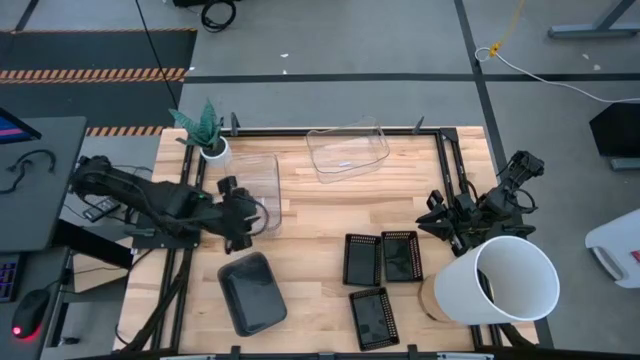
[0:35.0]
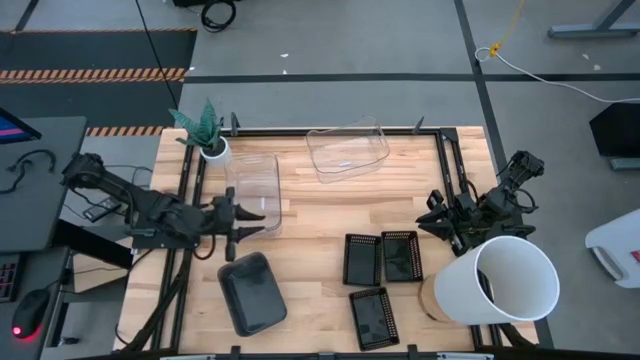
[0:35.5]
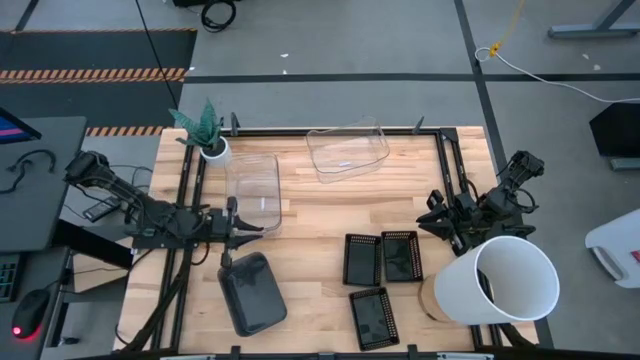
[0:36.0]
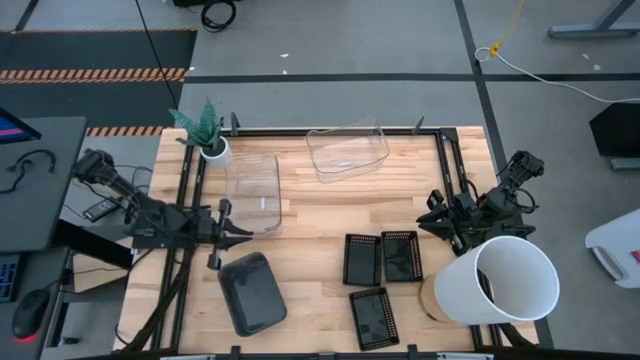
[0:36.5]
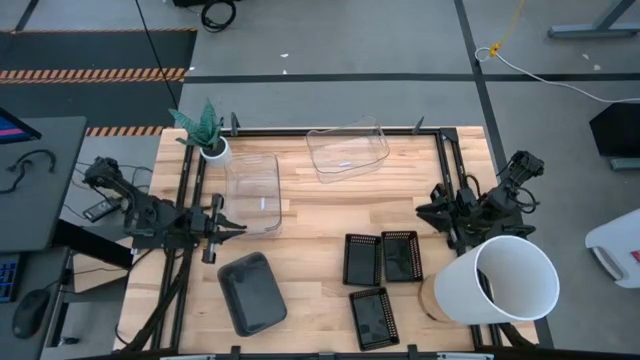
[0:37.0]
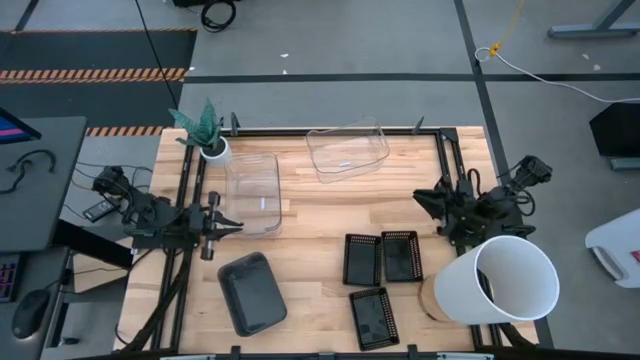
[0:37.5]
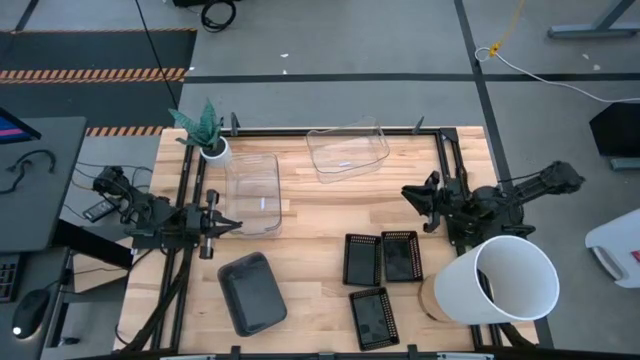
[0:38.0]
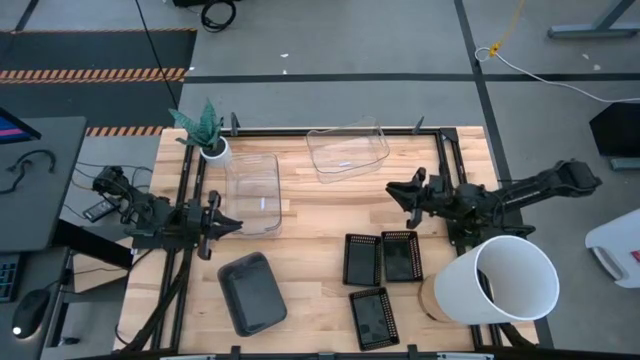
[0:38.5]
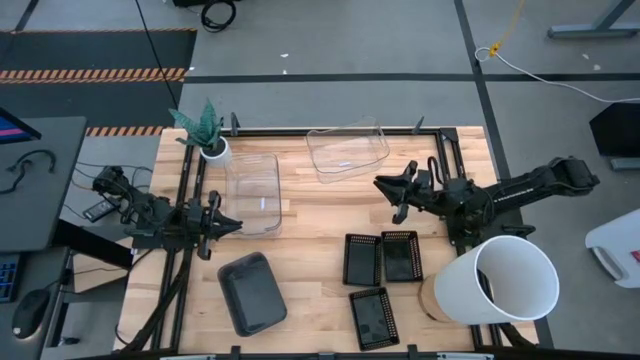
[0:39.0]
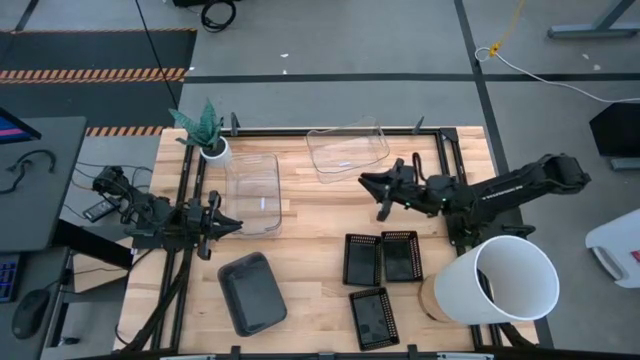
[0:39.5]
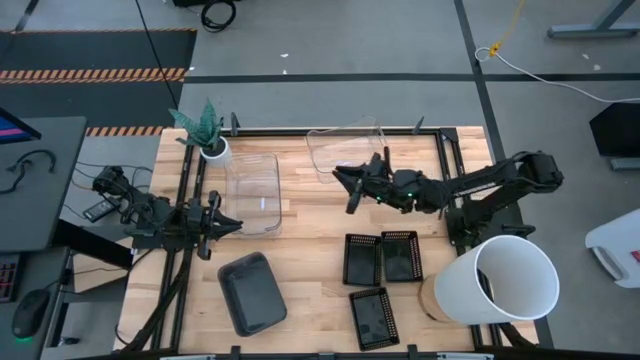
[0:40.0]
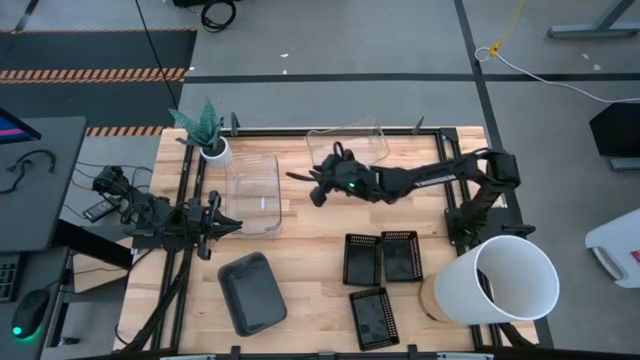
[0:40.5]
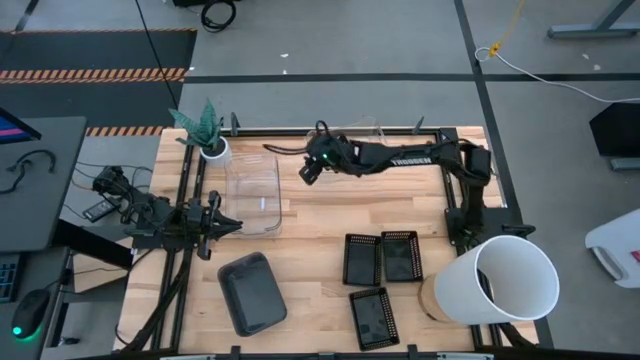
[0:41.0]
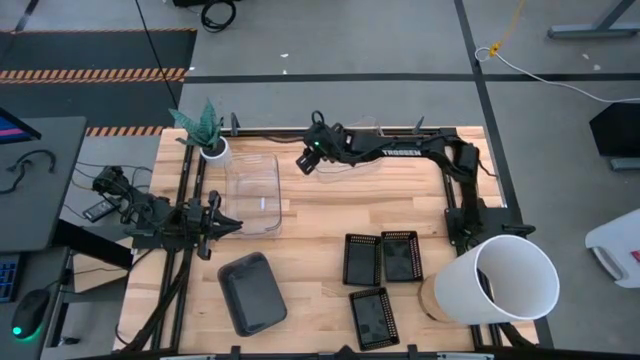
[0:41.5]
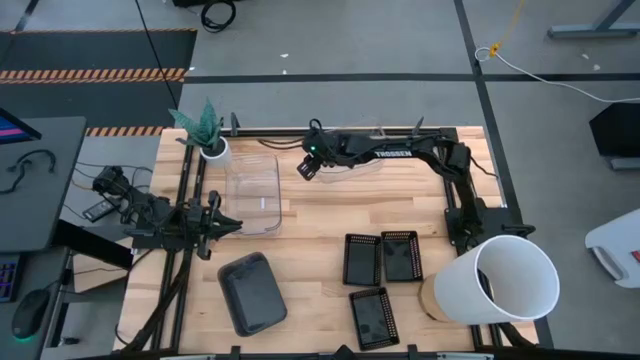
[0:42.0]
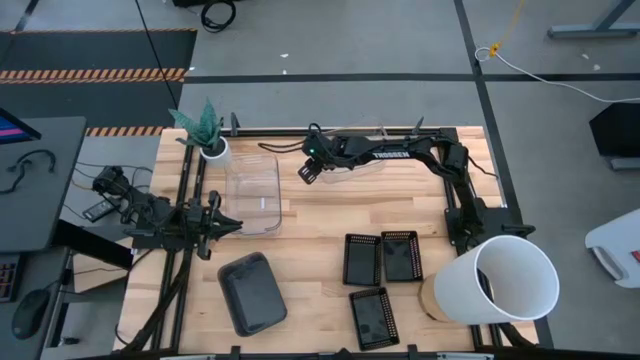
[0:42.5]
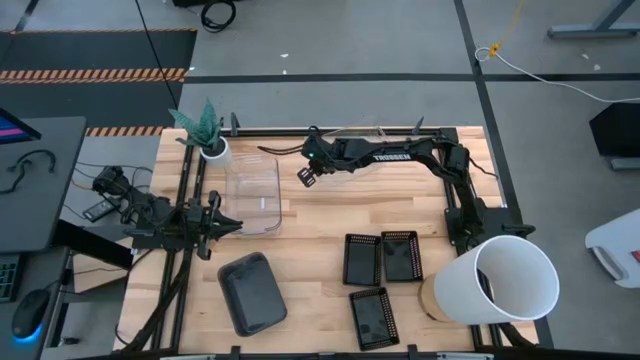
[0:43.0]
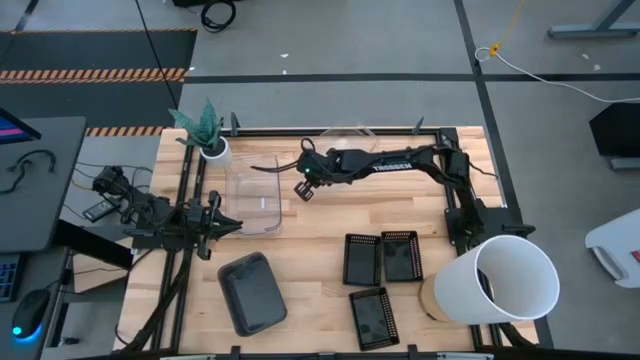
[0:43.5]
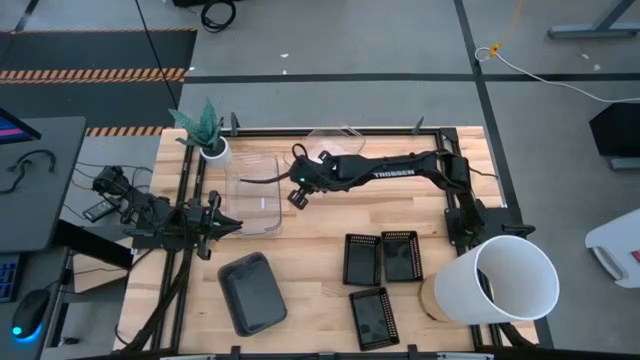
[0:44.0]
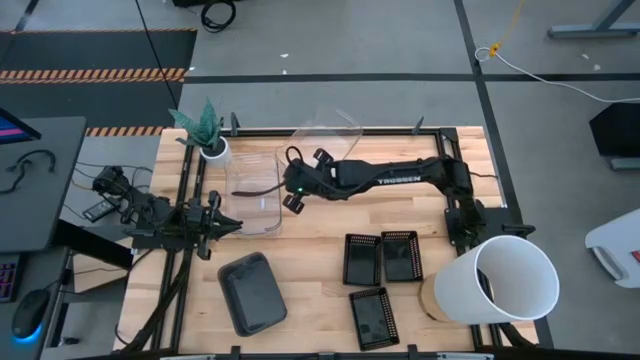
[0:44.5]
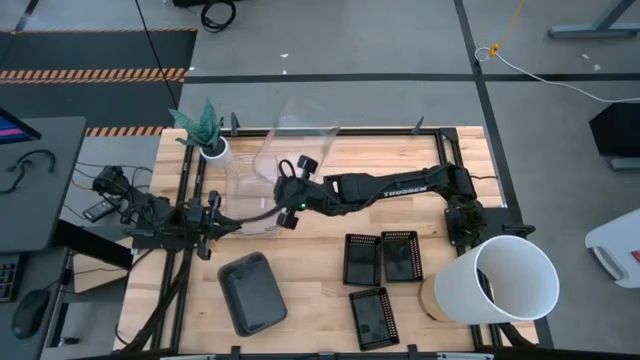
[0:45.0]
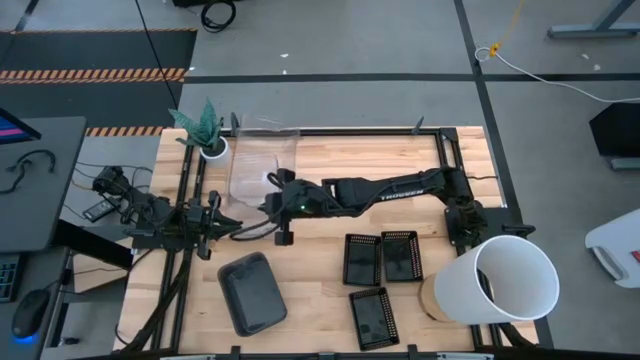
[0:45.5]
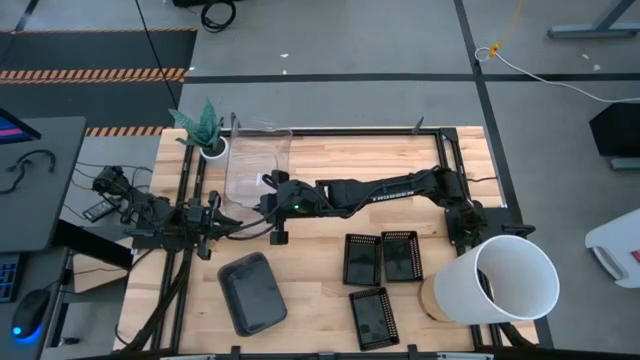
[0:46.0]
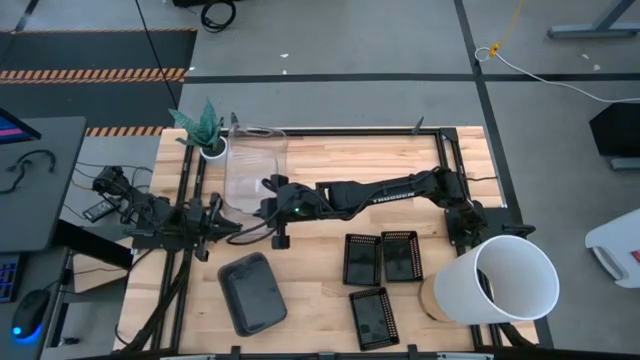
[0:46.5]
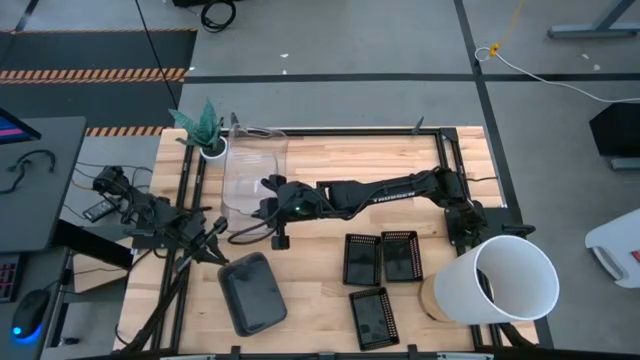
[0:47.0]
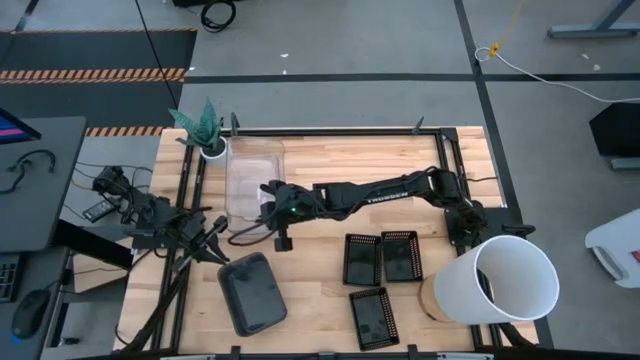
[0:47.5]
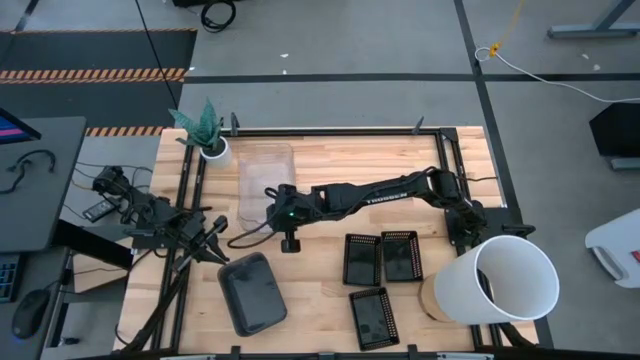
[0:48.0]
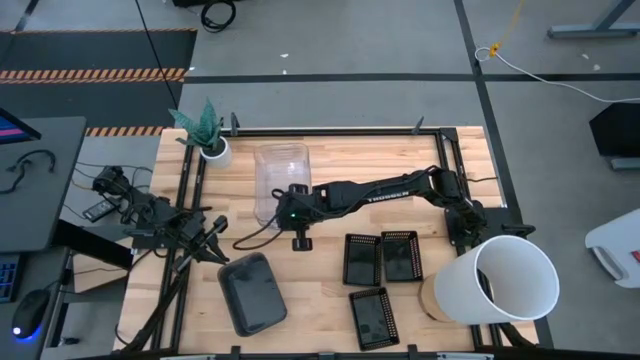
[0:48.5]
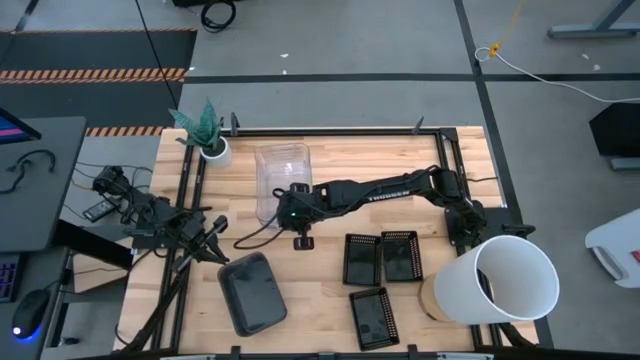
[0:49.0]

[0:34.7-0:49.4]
Stack the right transparent bin on the left transparent bin

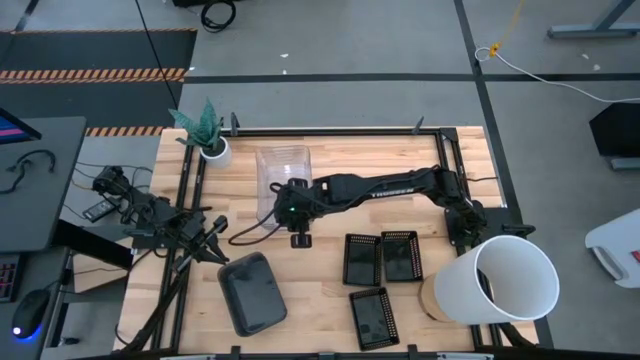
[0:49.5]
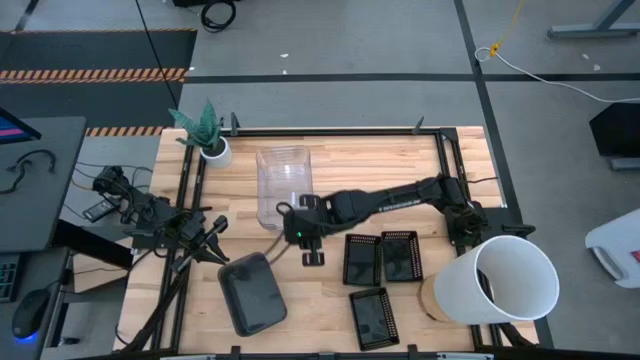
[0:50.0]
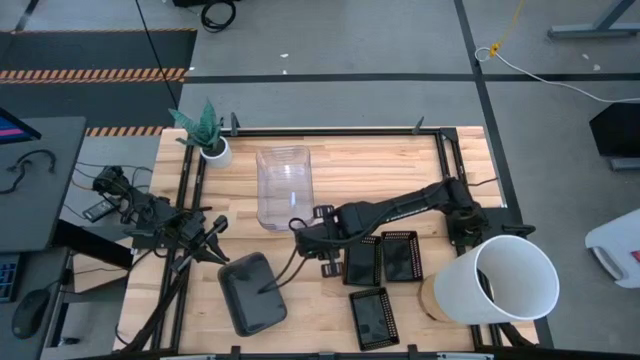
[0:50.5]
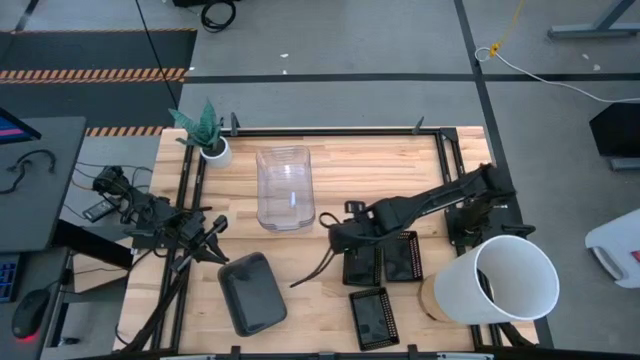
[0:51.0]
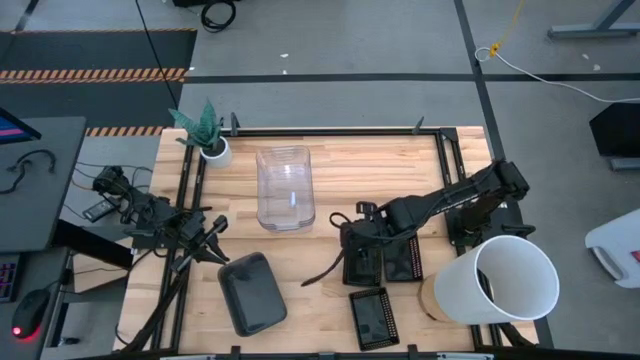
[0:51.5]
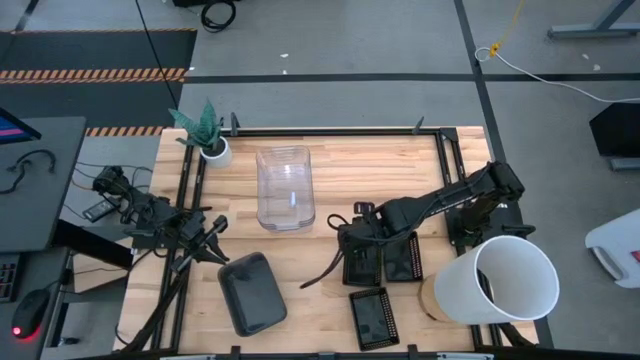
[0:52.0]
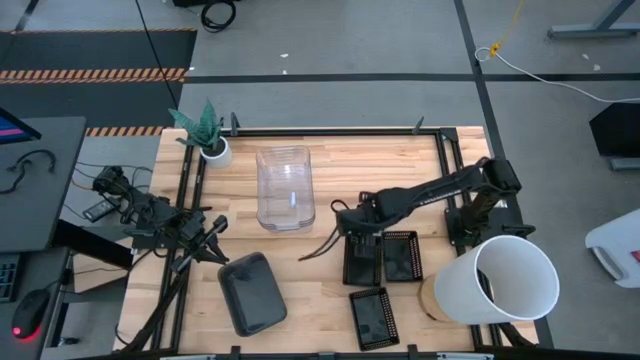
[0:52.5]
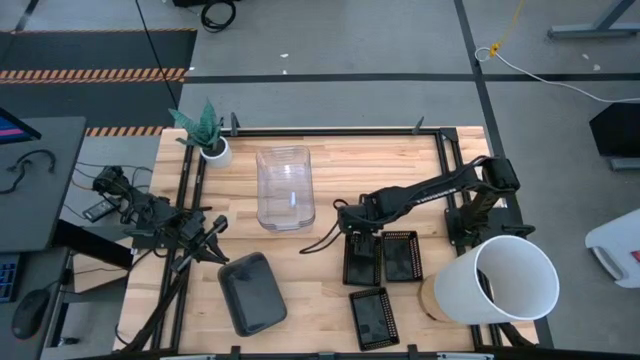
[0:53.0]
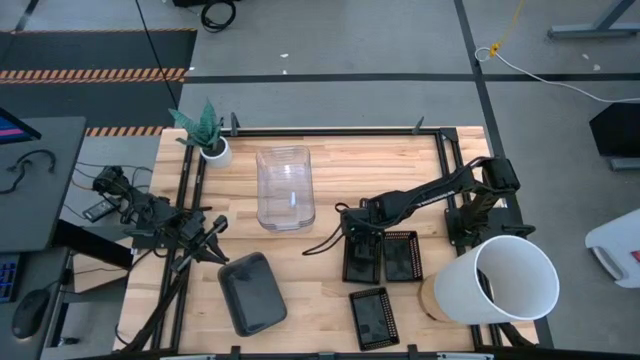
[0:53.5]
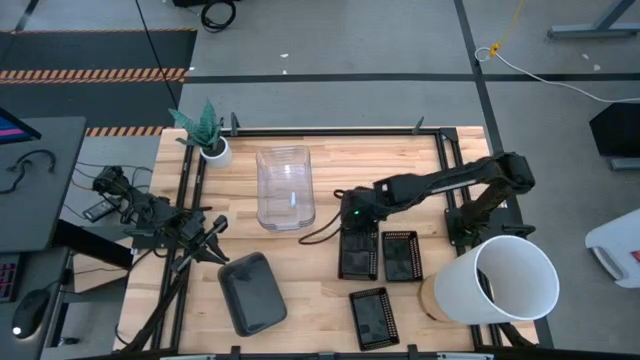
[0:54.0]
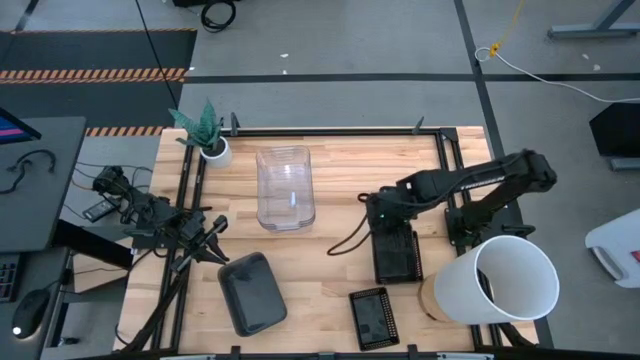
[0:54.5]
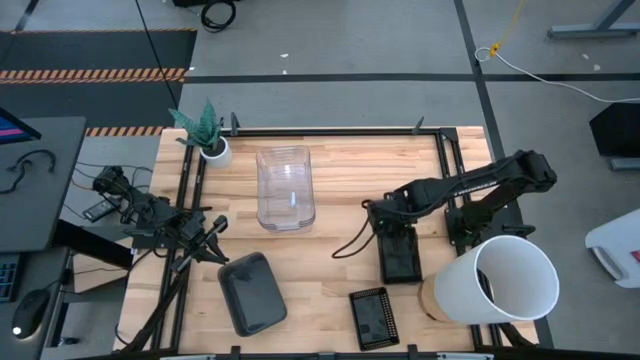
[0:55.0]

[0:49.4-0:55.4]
Stack the left black bin on the top right black bin
